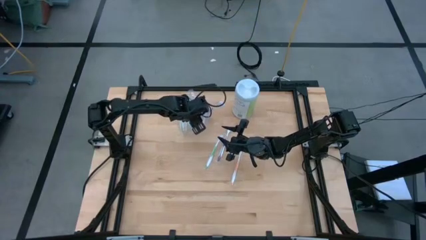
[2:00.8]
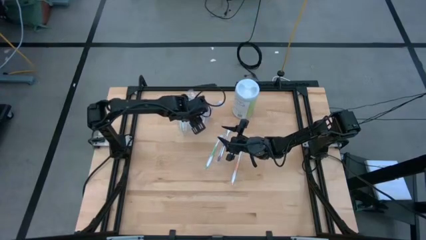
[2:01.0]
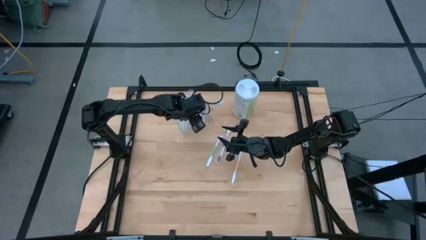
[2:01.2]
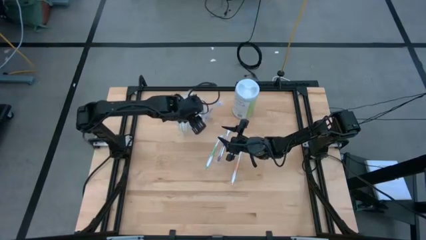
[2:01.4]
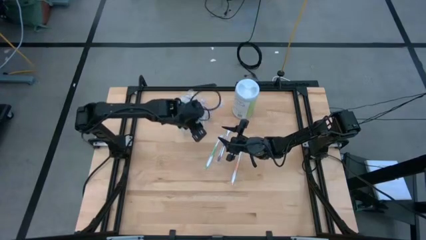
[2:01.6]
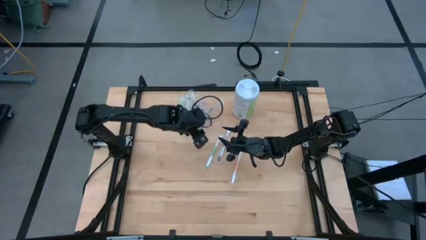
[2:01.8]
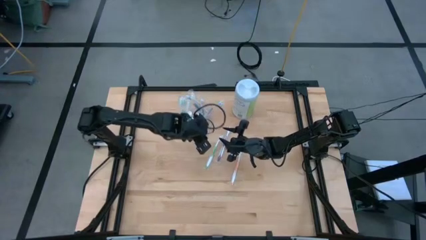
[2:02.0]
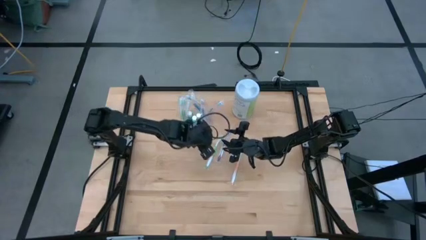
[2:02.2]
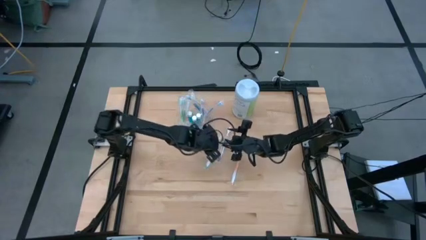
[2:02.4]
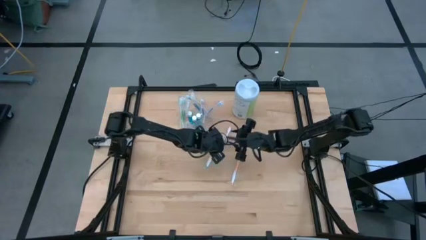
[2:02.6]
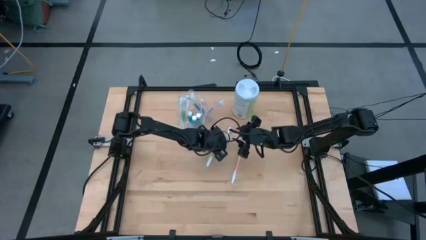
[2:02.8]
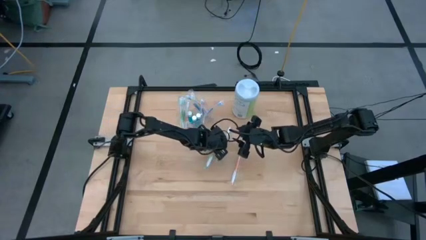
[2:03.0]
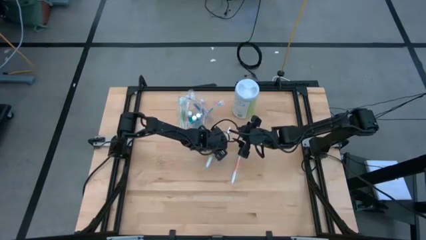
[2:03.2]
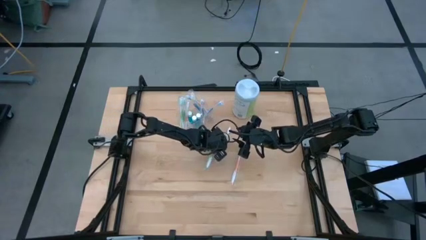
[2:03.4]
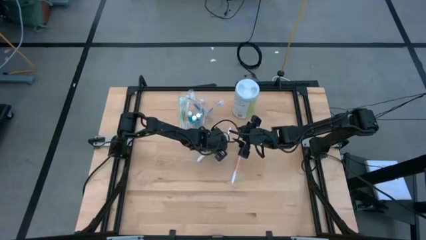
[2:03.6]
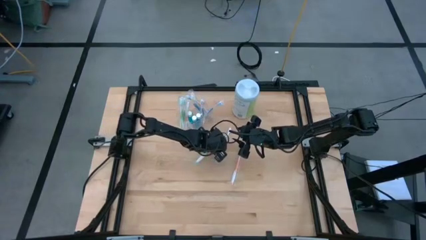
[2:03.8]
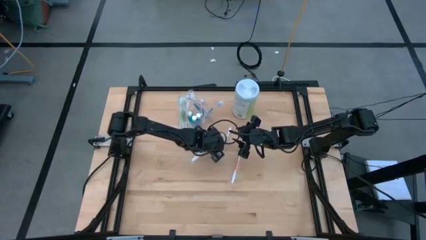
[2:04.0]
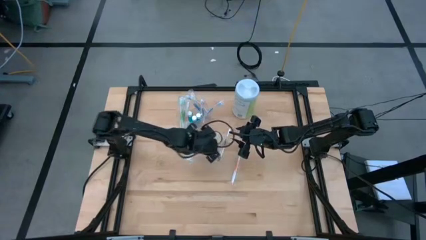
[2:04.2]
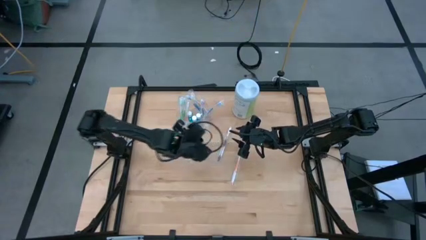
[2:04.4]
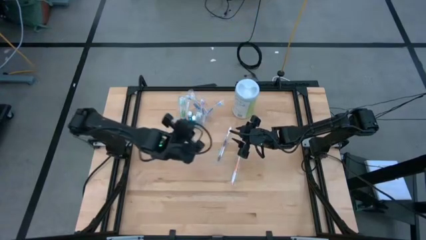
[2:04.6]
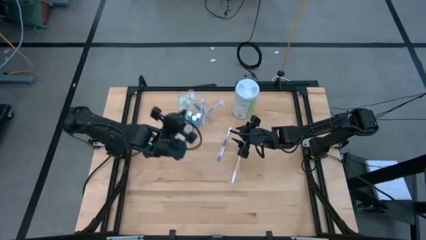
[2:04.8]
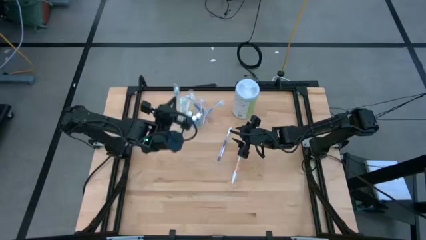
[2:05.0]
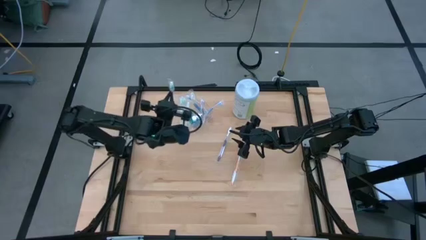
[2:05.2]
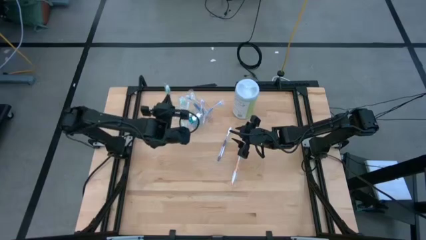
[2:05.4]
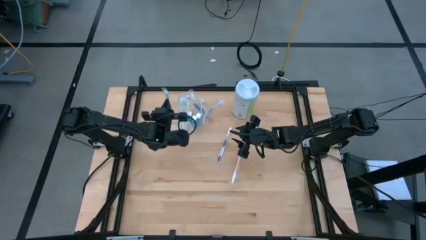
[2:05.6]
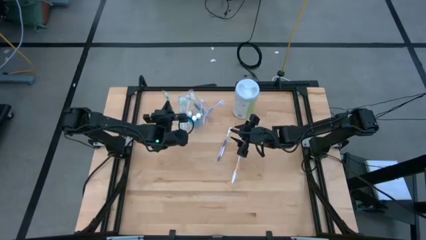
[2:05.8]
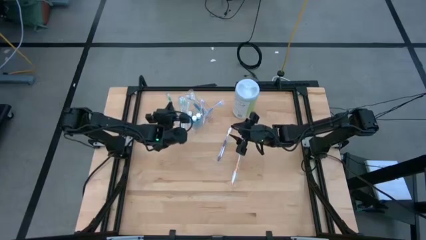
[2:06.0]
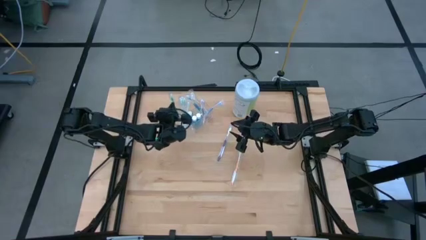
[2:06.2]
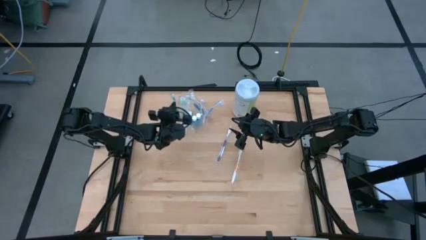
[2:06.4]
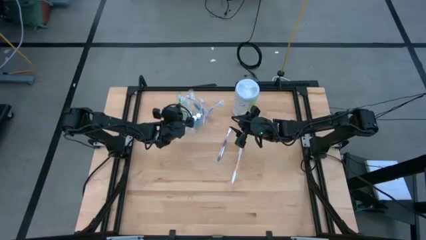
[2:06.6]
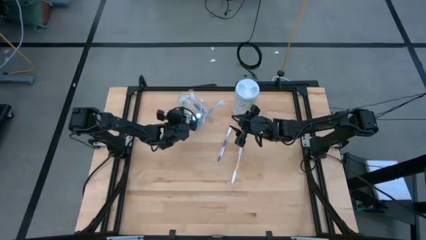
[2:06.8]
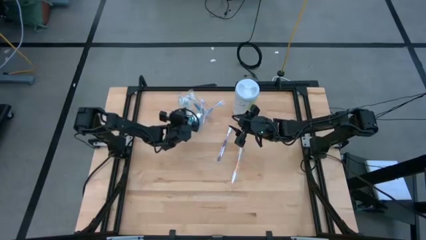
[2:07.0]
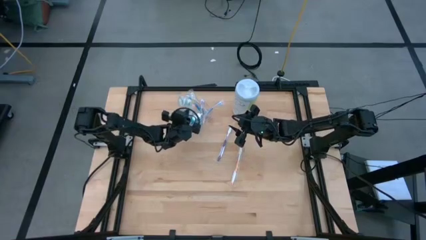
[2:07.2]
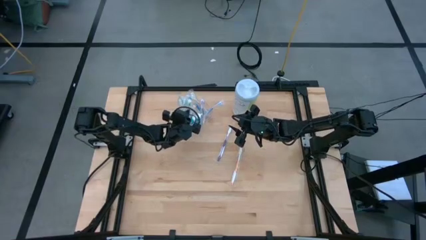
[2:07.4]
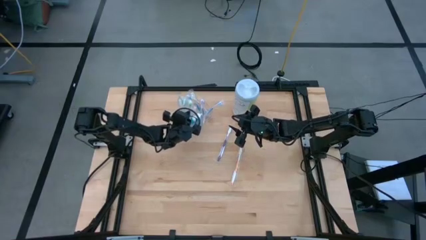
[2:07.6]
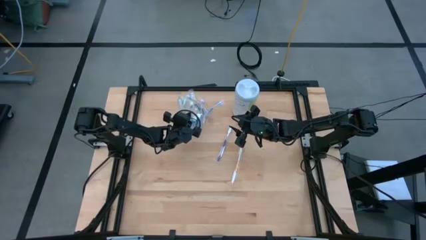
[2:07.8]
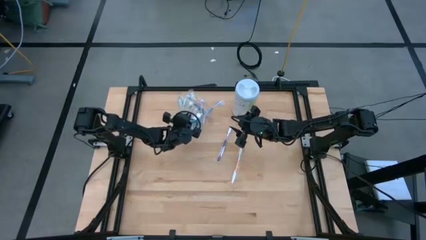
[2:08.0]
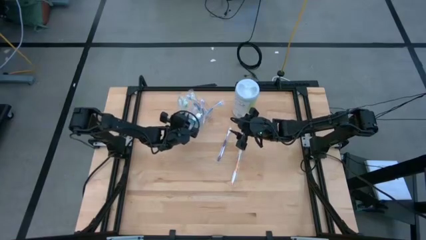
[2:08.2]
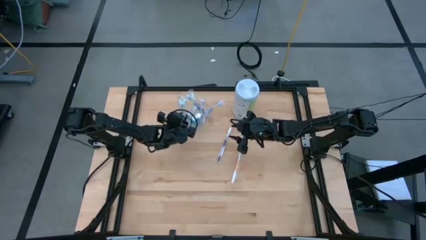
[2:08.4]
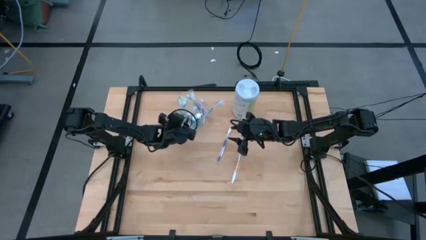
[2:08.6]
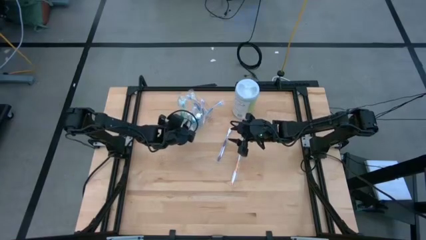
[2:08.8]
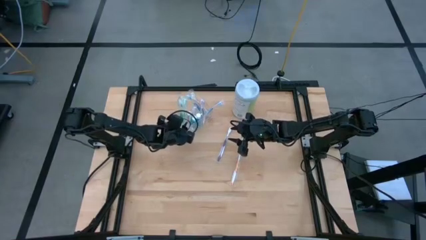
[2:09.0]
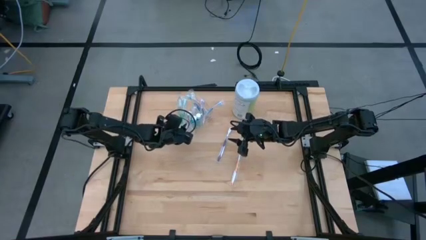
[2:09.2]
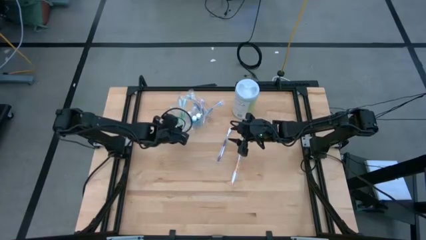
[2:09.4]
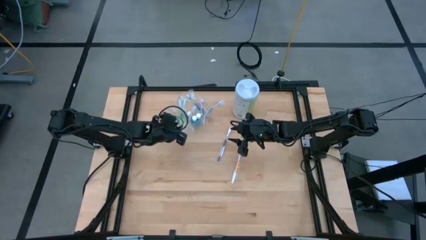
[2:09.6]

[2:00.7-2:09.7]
Task: Pick & Place toothbrushing station
Put the green toothbrush into the transparent organizer

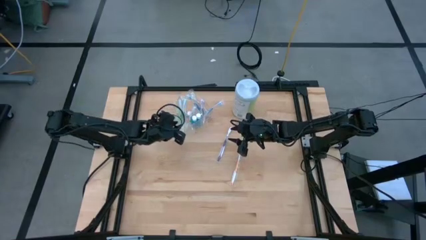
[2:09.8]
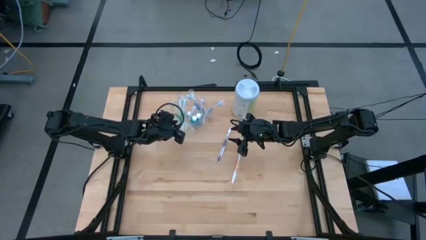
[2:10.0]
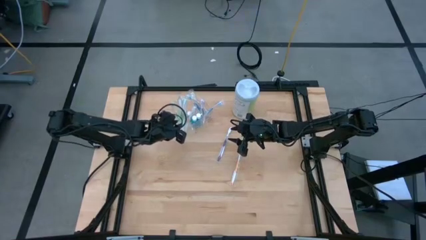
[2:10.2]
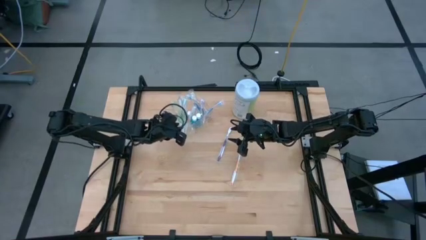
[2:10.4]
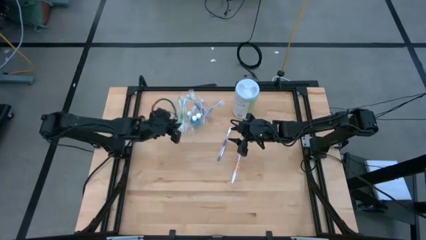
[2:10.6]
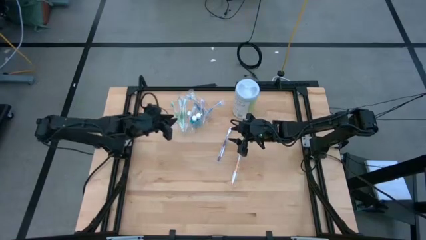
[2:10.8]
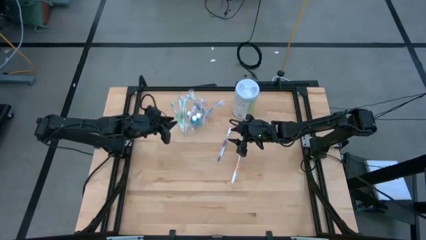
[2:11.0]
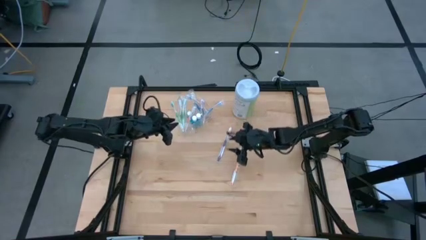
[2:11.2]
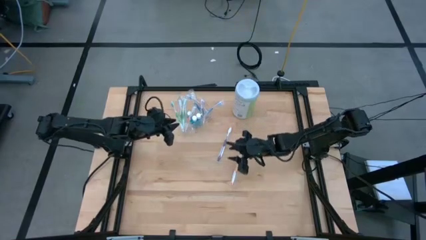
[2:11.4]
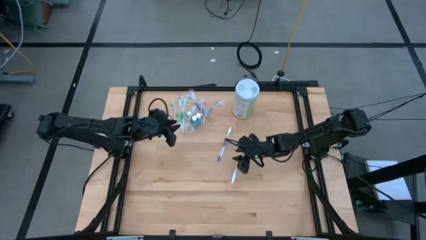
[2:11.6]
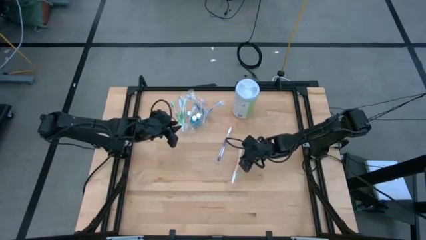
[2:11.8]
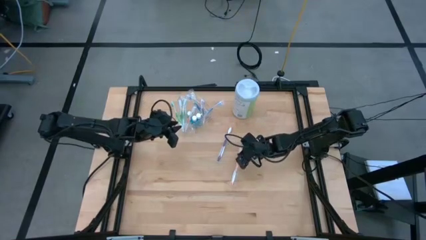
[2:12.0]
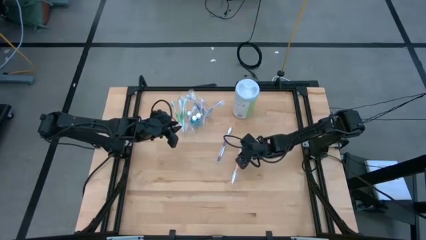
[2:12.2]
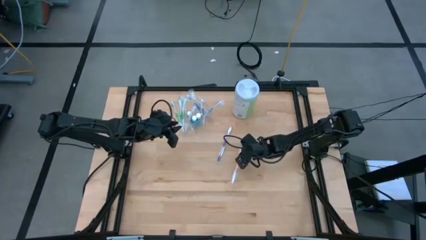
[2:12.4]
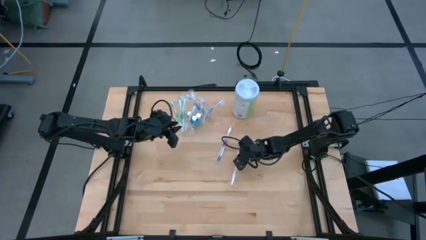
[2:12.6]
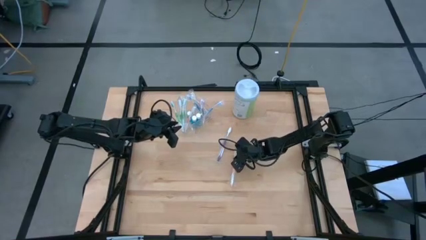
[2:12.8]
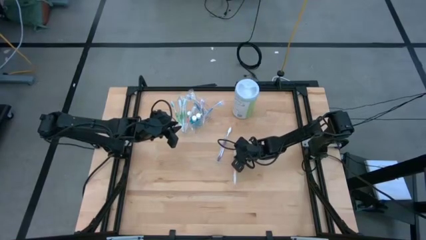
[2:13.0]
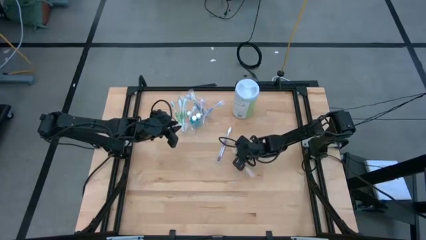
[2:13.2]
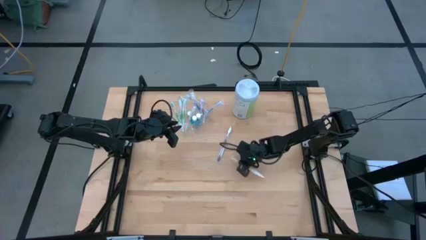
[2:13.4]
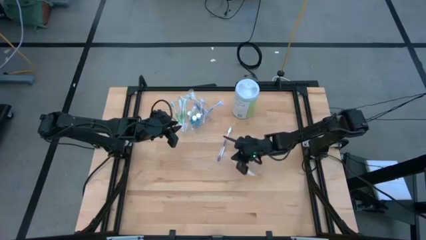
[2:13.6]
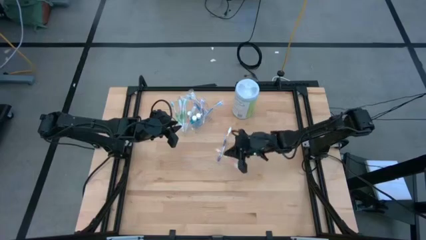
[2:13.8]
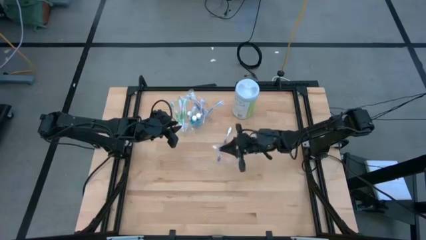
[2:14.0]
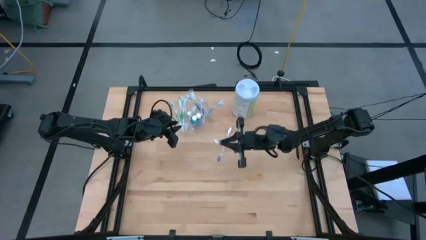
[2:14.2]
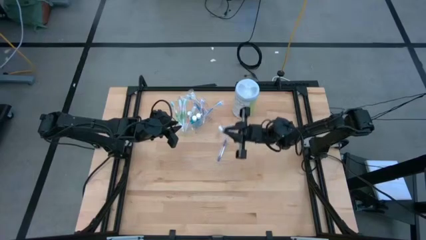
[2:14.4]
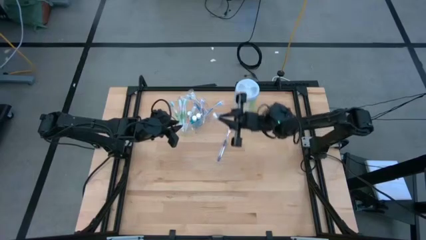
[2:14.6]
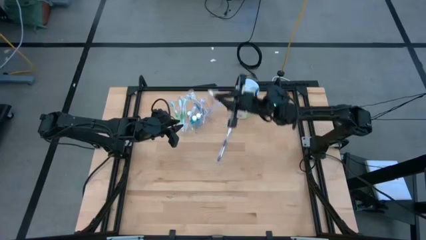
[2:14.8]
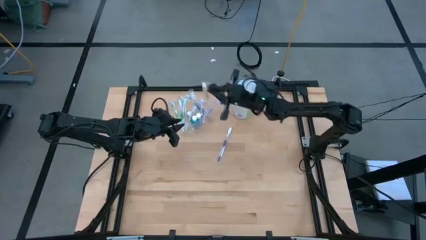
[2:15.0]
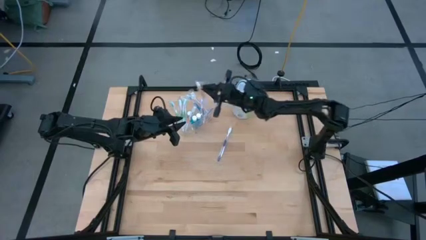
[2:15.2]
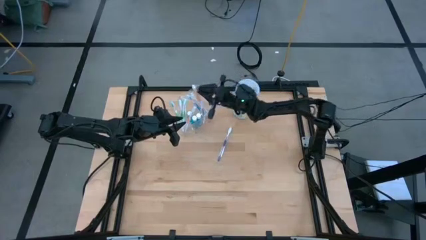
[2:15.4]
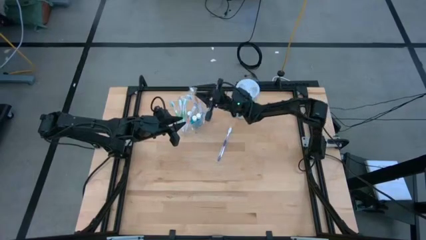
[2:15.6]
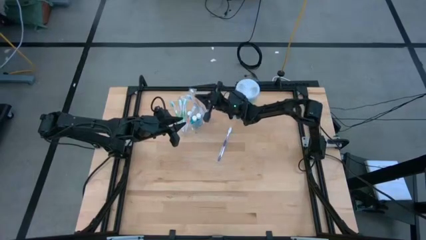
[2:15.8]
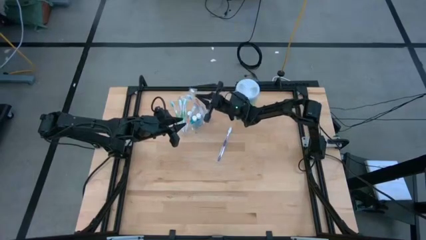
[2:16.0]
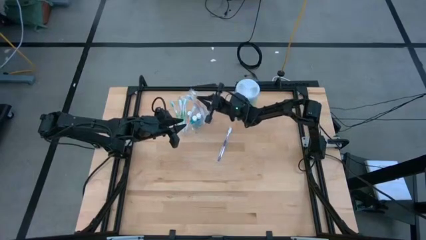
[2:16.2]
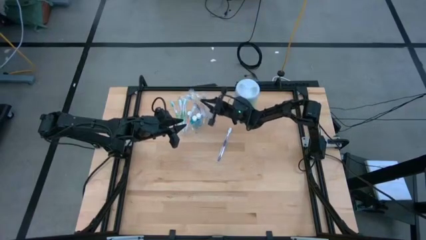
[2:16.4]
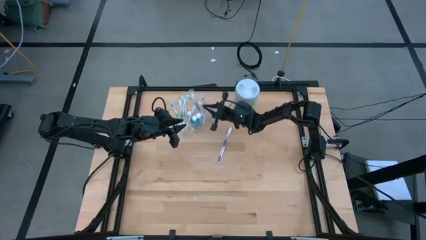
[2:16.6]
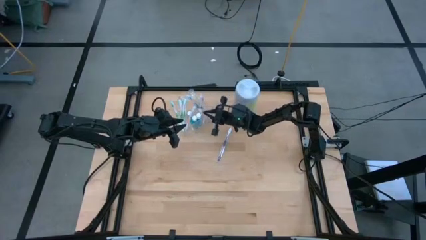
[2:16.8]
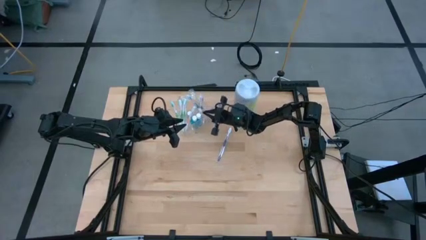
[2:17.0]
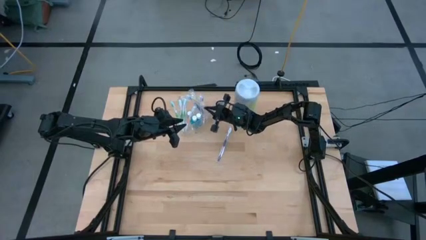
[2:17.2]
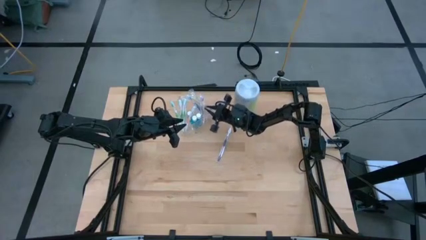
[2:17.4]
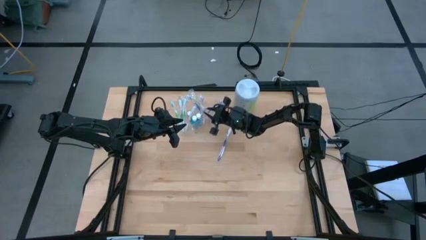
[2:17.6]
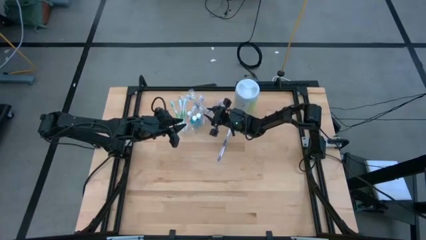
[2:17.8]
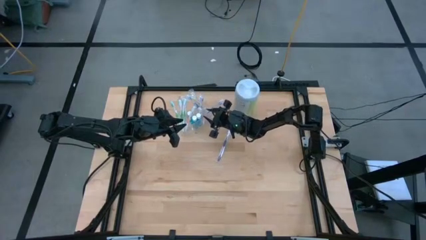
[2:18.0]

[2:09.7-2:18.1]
Put the orange toothbrush into the transparent organizer
